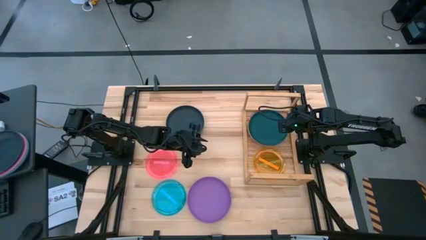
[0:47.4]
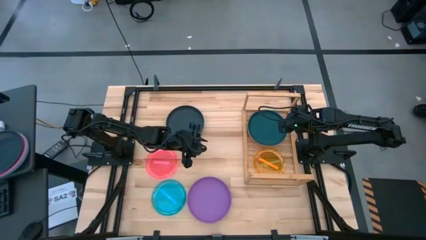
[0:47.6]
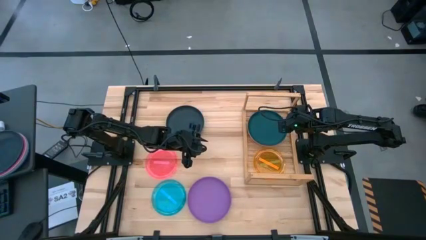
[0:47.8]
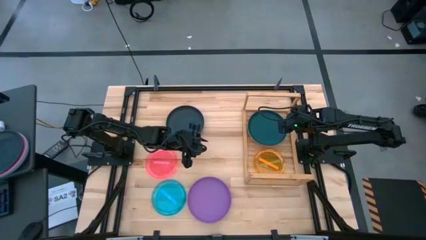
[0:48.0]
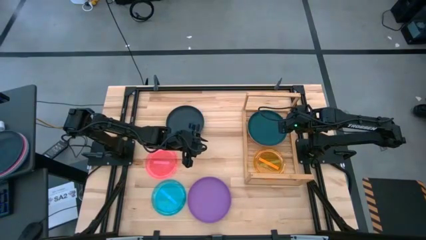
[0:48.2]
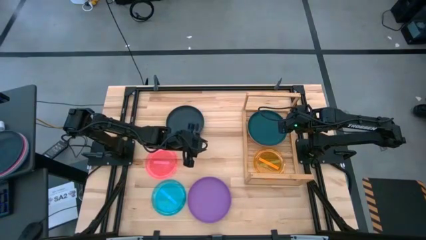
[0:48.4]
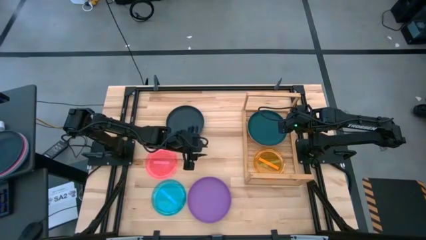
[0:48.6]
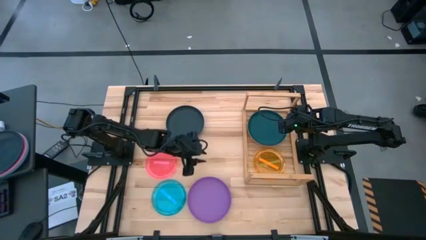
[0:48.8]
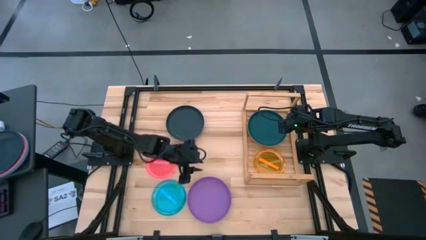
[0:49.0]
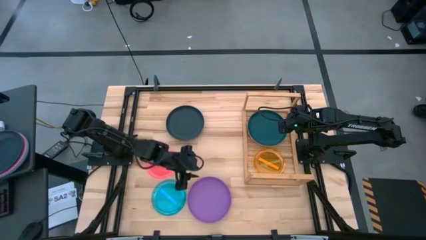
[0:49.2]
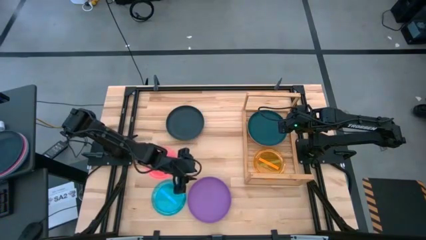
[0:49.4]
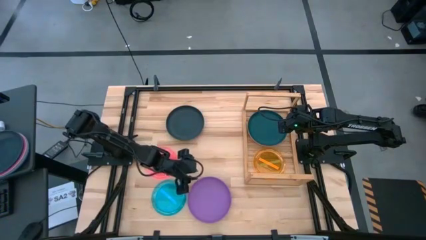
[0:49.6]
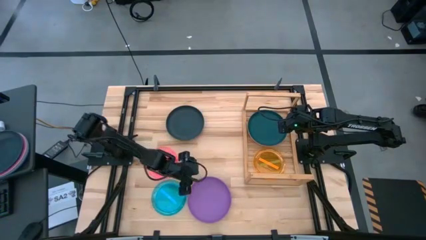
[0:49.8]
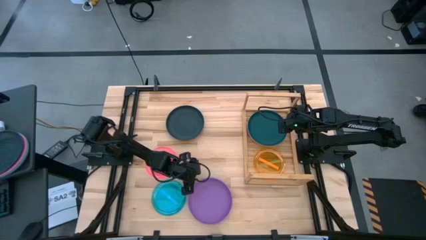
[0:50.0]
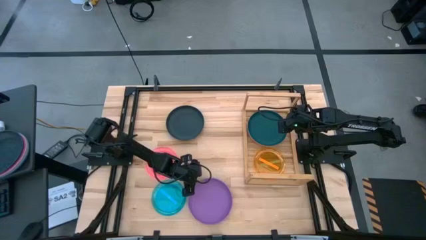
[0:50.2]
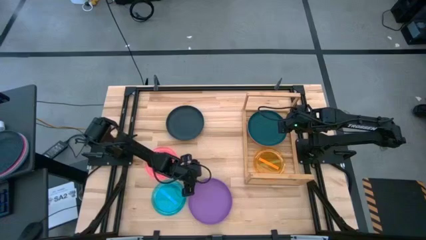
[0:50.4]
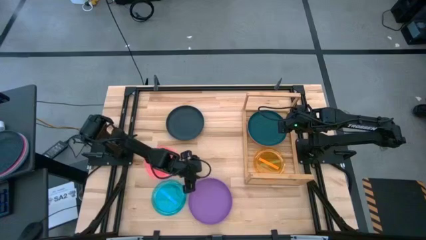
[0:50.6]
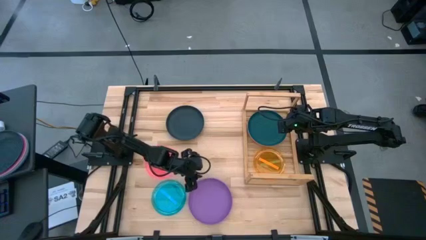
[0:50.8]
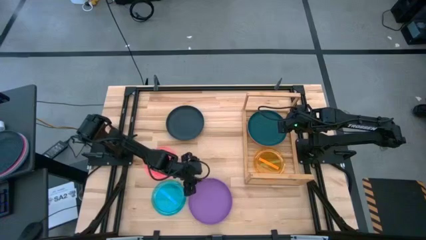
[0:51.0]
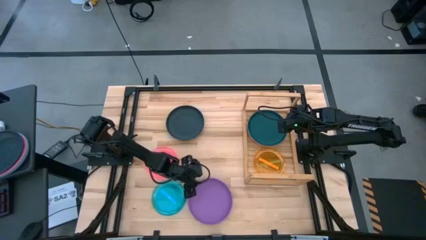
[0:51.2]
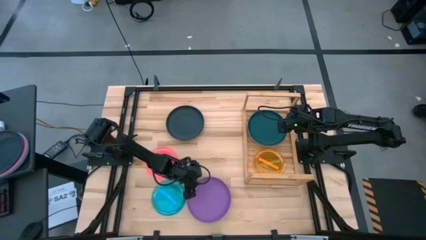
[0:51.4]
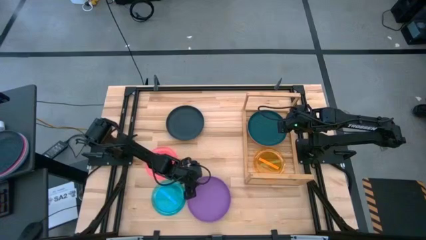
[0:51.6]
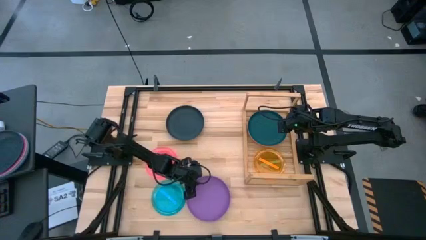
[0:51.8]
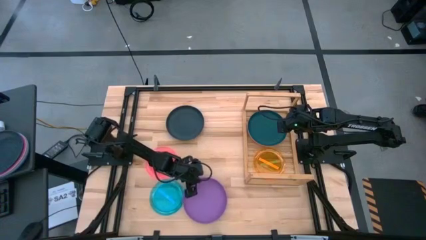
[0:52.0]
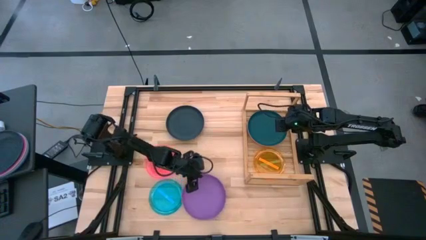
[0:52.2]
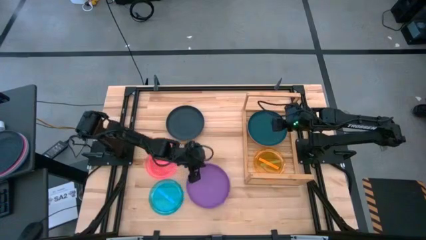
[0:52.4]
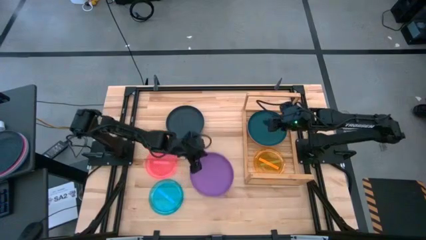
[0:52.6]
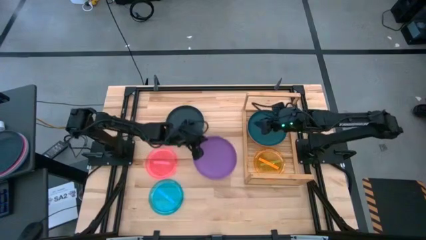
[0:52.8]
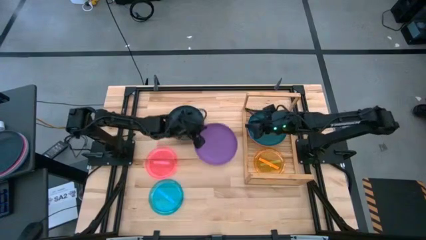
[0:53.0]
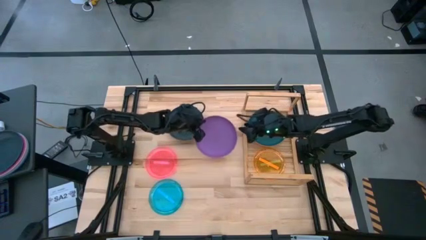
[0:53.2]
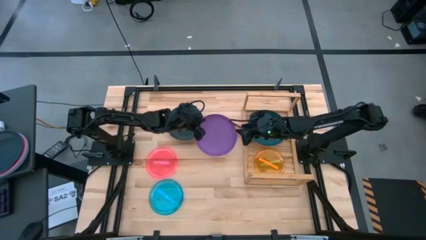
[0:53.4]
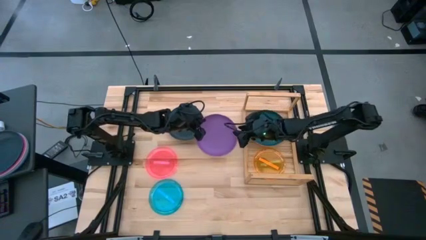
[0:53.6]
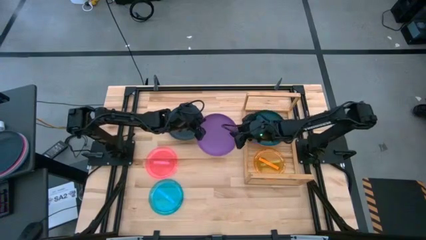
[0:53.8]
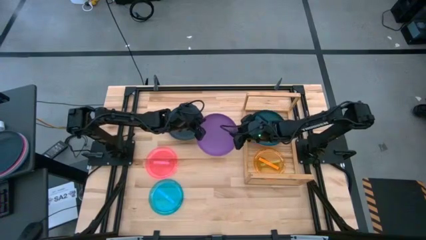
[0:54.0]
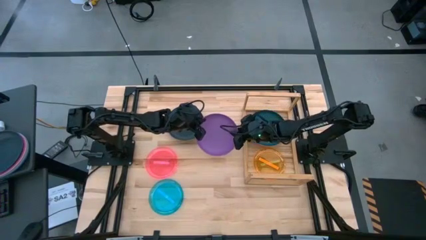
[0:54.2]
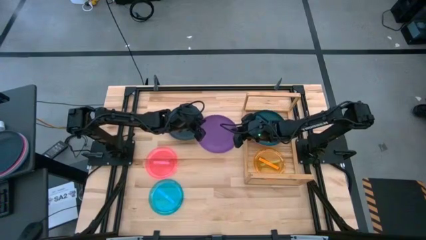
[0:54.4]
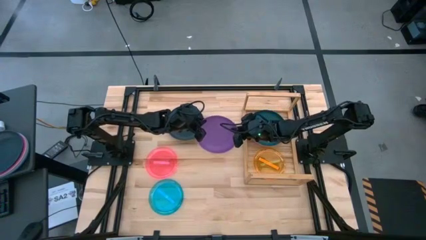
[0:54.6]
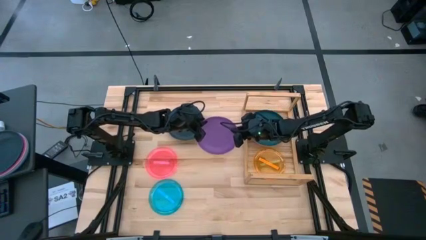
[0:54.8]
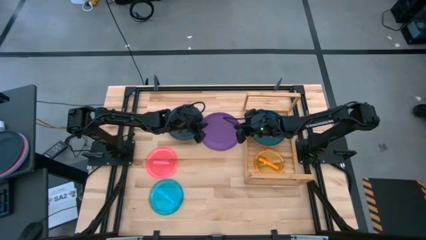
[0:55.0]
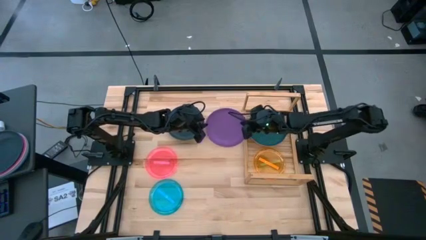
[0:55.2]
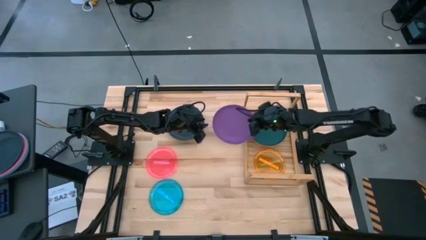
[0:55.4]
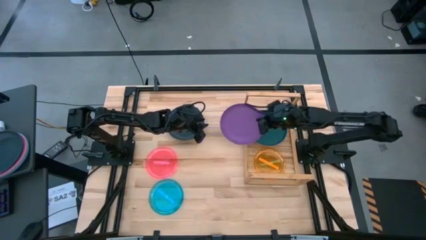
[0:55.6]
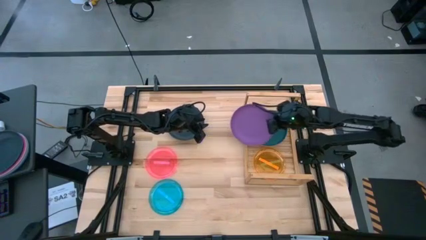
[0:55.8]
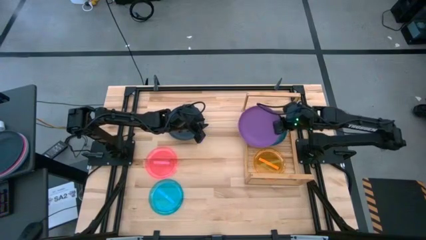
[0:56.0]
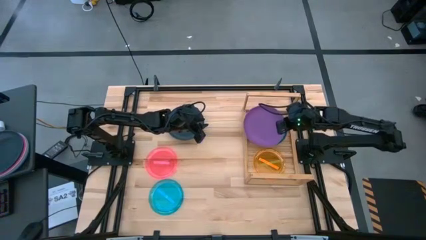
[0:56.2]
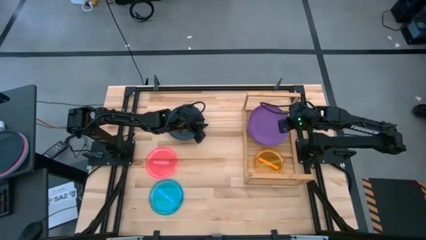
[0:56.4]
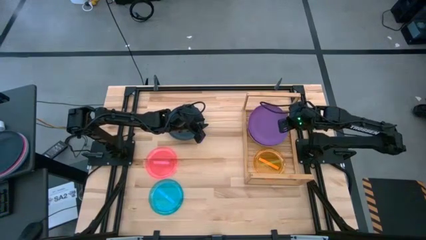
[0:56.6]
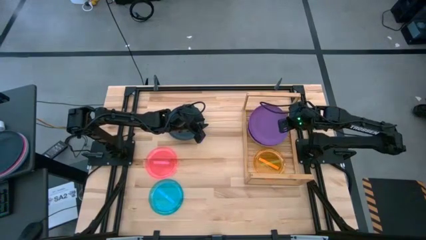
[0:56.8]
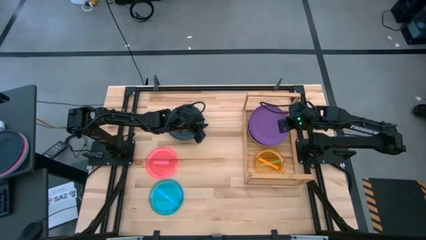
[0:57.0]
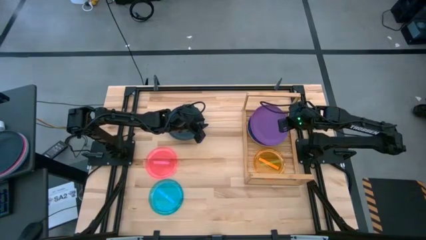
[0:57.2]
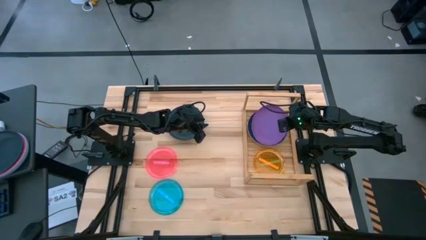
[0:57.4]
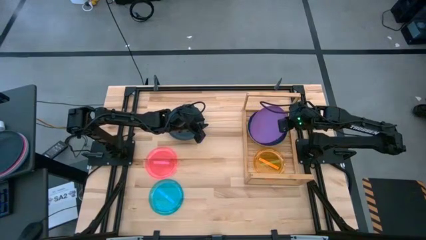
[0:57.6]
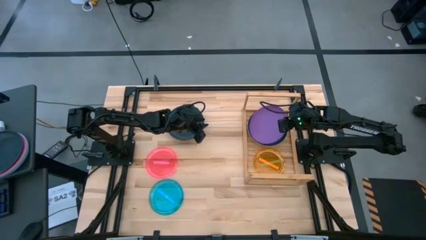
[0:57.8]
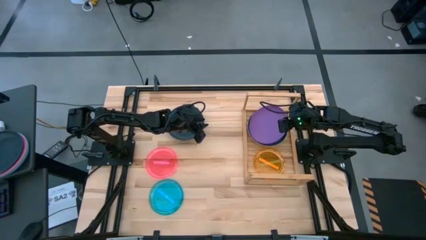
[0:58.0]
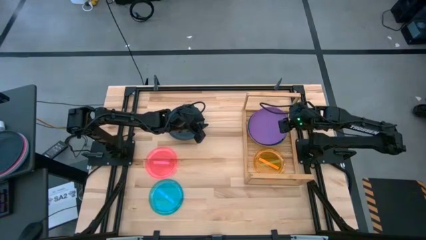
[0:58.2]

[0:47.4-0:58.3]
Task: Place and stack plates onto a shelf
Stack the purple plate on top of the blue plate on the shelf
